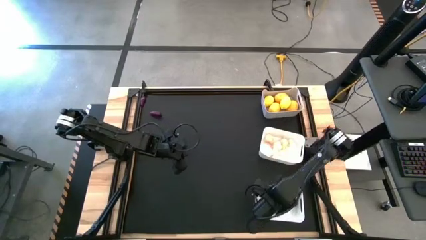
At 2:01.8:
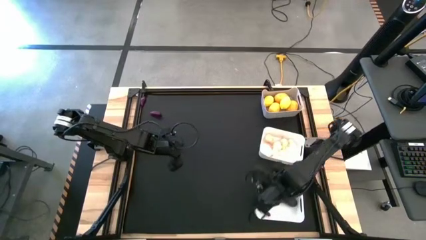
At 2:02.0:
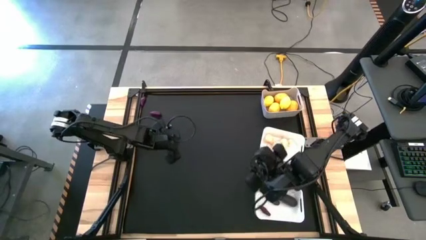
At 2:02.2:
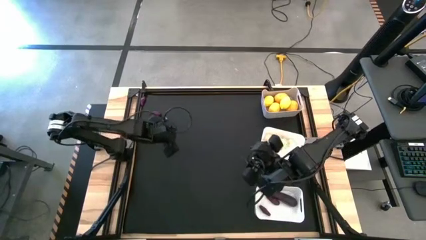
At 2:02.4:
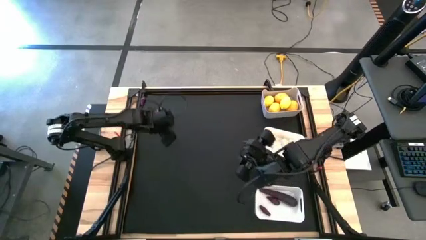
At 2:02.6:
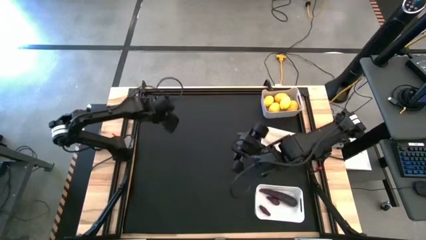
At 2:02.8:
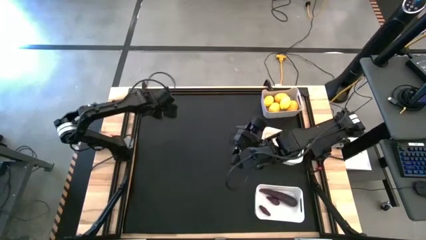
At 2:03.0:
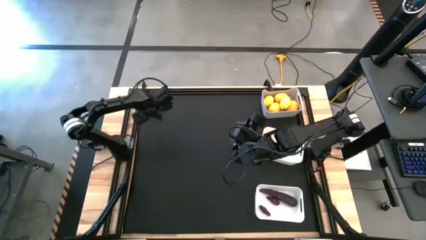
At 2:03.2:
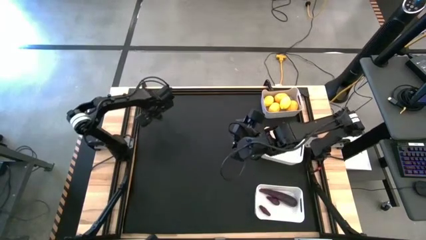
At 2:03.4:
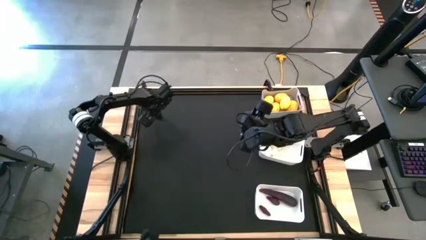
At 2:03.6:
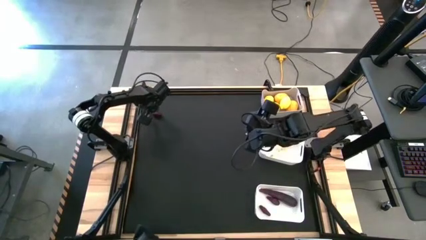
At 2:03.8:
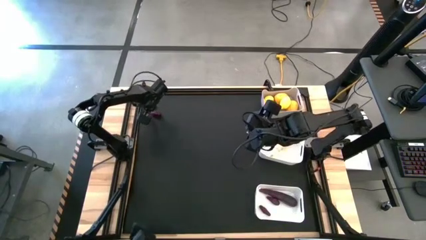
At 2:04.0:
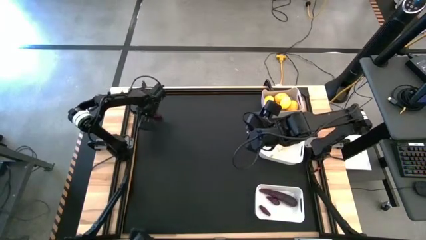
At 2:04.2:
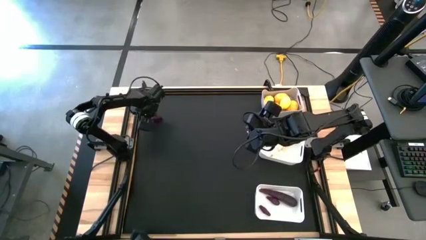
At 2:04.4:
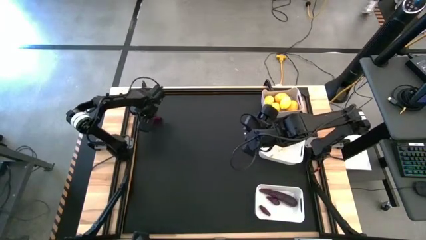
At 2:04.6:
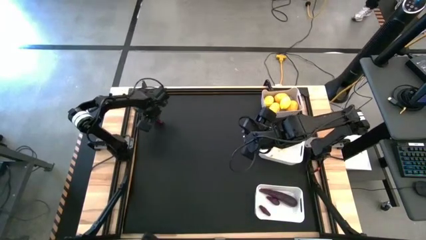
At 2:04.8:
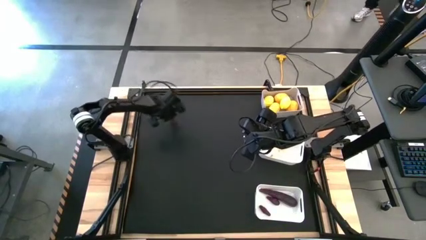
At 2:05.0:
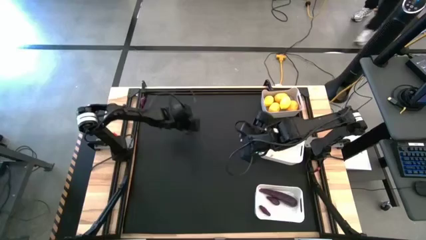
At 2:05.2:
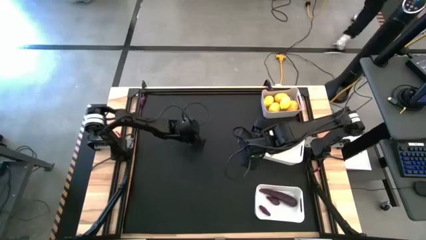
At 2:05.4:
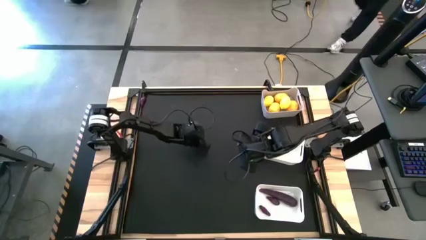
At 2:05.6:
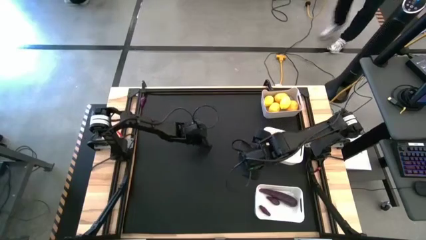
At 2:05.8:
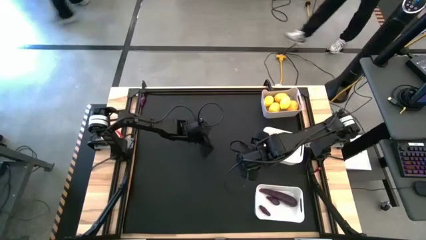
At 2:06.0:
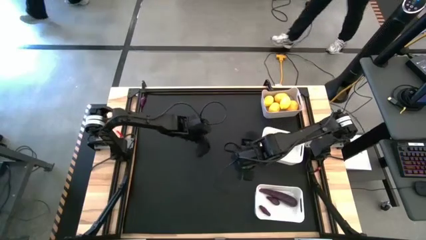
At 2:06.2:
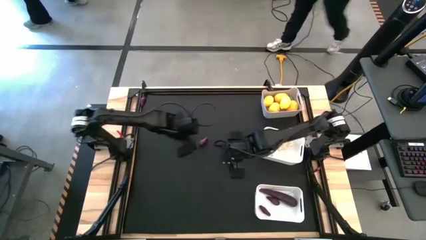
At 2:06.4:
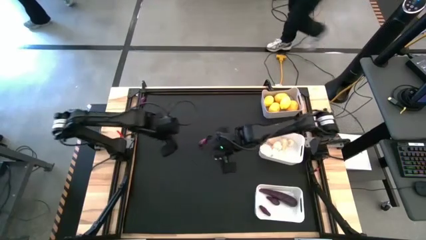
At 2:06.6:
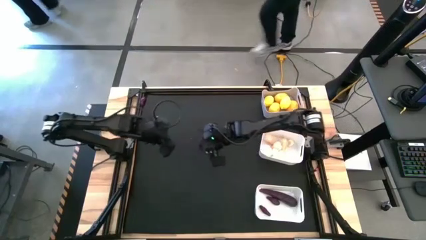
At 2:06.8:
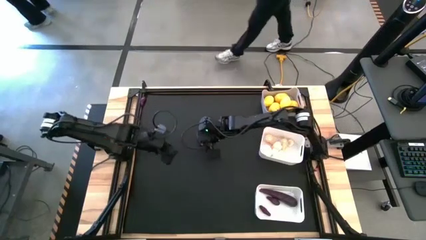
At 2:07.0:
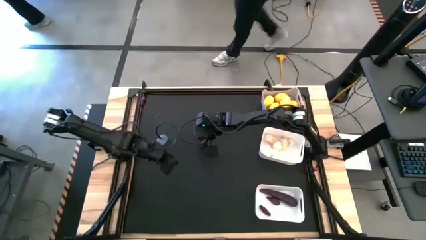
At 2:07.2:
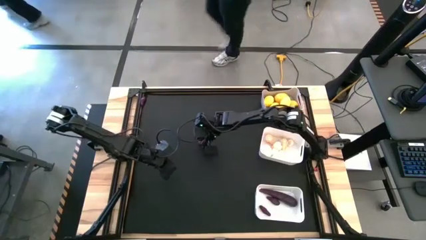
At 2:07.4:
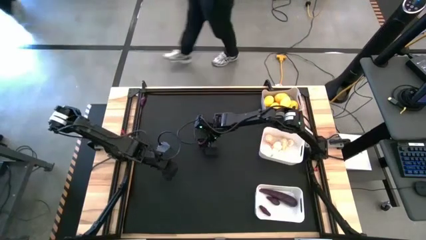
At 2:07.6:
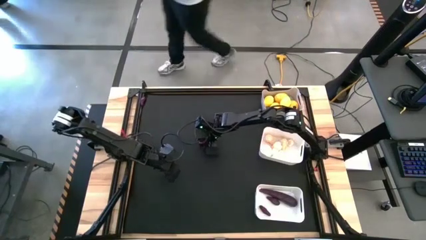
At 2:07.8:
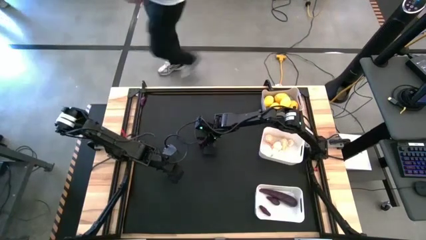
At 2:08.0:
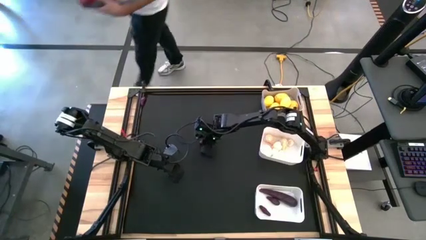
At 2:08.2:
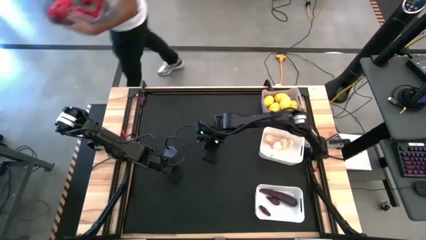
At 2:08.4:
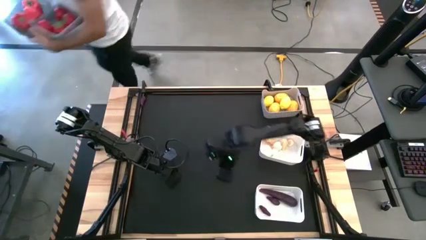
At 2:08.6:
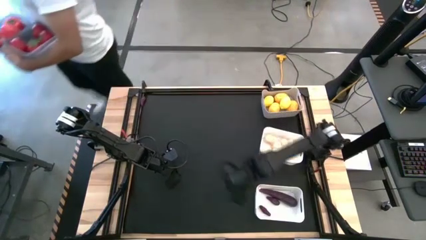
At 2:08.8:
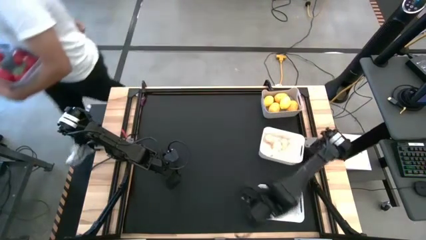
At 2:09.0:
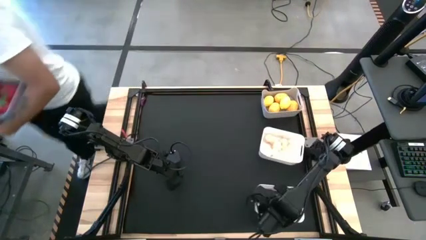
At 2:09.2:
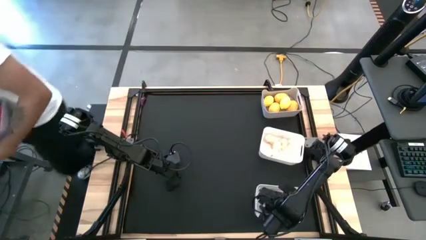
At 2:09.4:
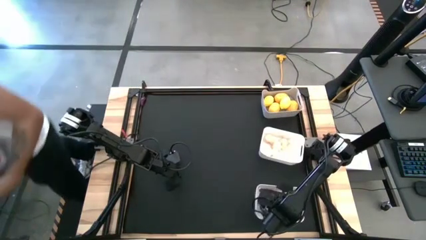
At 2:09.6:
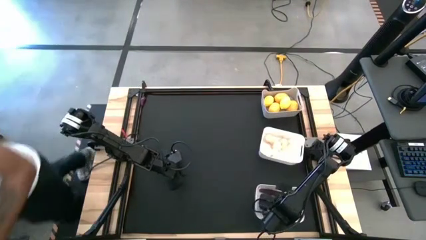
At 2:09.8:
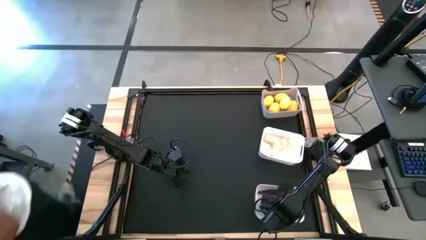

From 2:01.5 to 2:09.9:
Task: Sort produce into baskets
Put the eggplant into the bottom white bin

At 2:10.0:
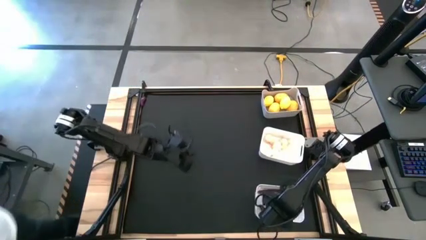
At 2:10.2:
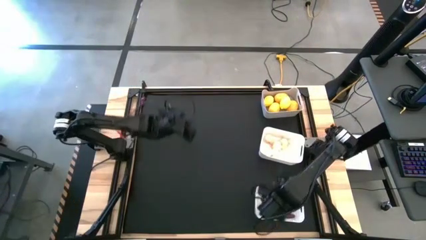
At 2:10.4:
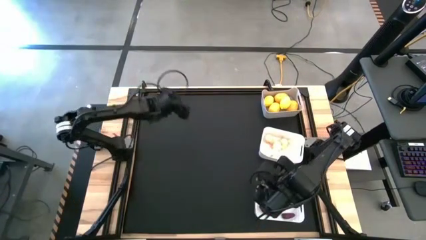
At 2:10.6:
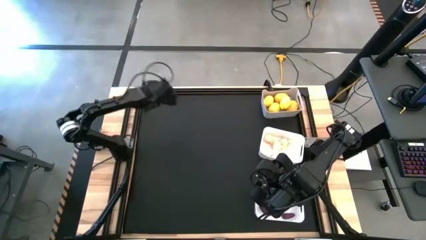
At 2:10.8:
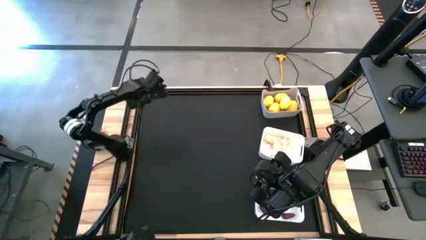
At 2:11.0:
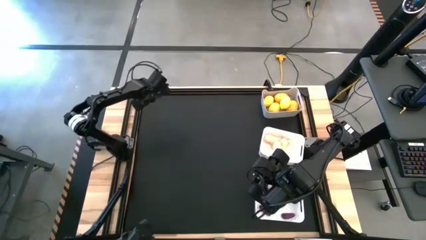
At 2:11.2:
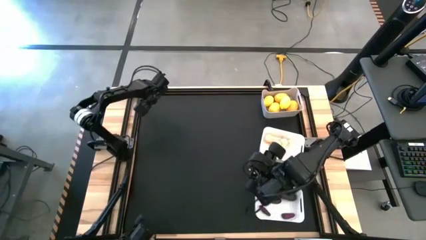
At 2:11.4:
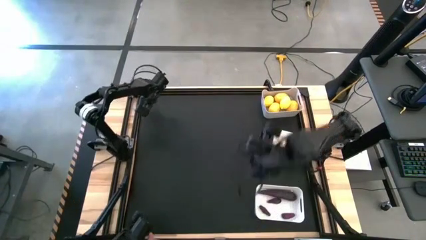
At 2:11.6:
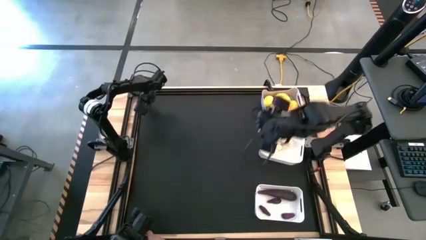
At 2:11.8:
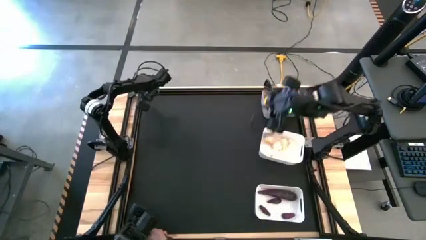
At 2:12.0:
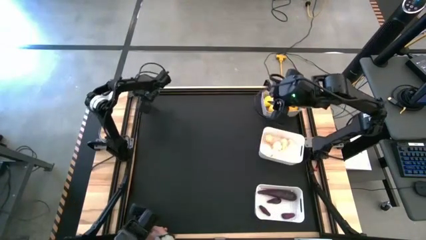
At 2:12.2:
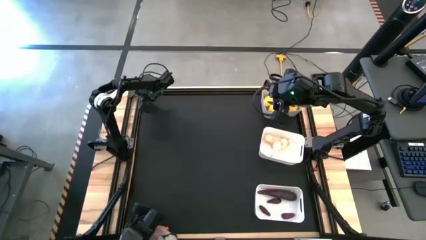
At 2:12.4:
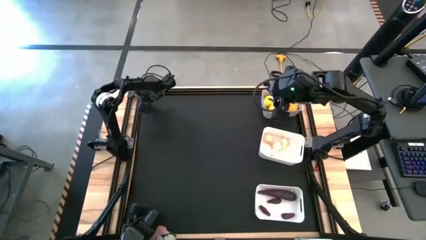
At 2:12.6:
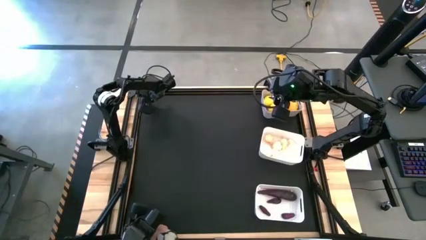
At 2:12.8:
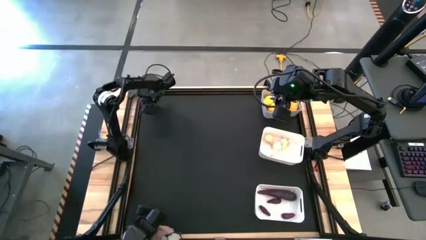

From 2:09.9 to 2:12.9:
Put the eggplant into the bottom white bin

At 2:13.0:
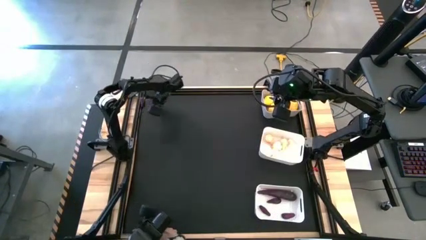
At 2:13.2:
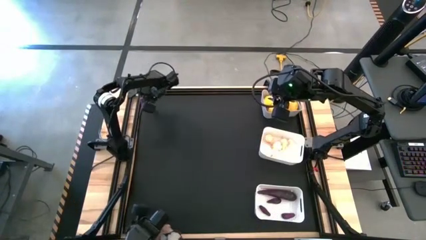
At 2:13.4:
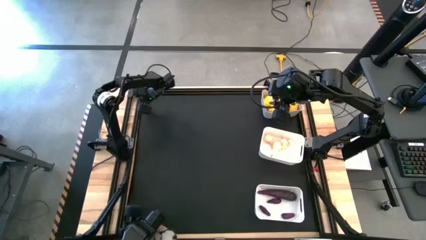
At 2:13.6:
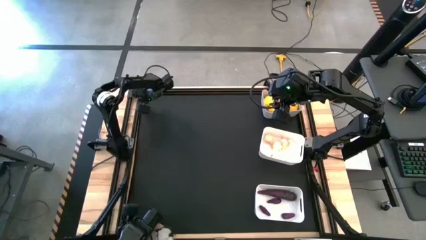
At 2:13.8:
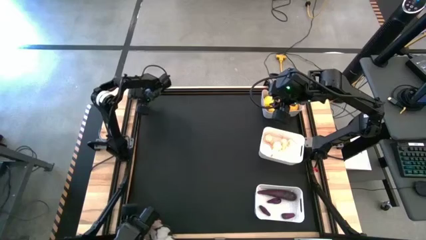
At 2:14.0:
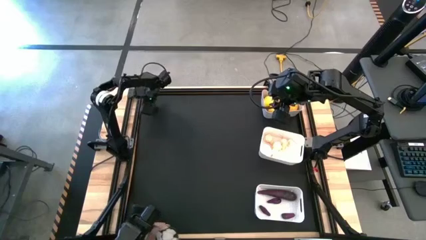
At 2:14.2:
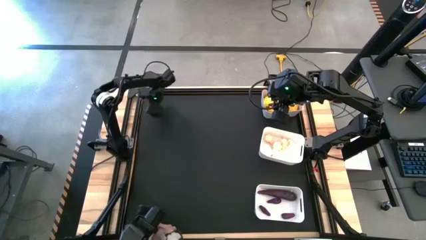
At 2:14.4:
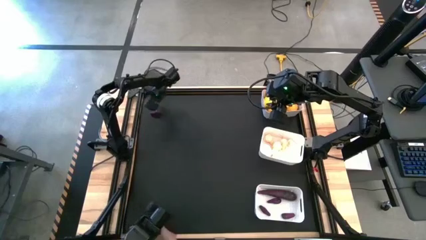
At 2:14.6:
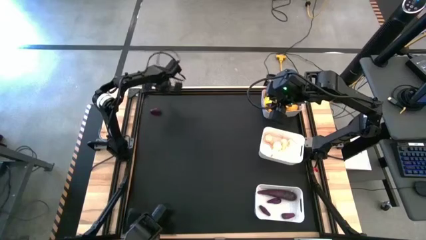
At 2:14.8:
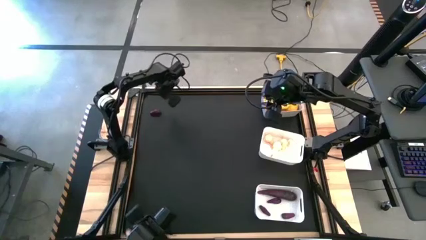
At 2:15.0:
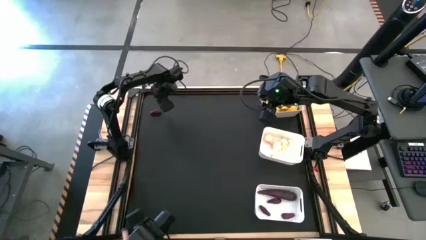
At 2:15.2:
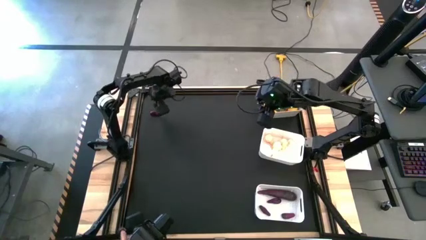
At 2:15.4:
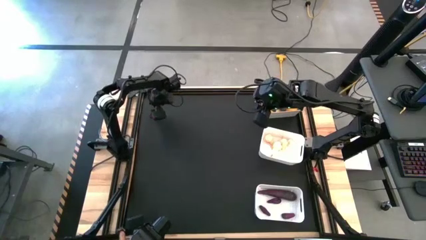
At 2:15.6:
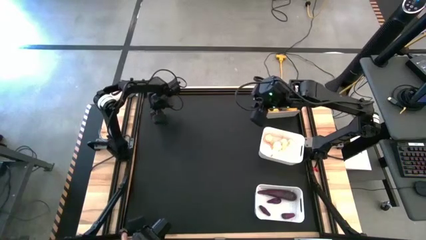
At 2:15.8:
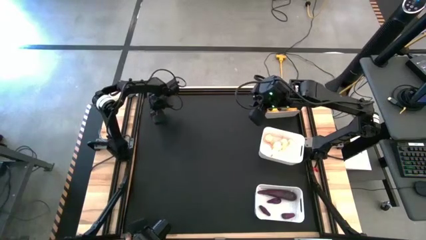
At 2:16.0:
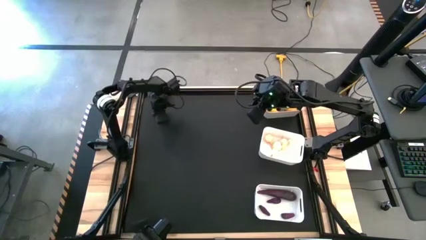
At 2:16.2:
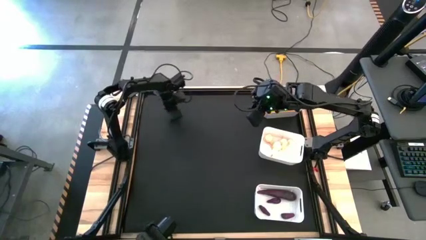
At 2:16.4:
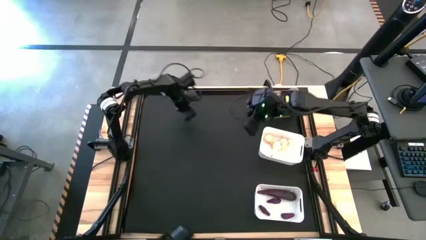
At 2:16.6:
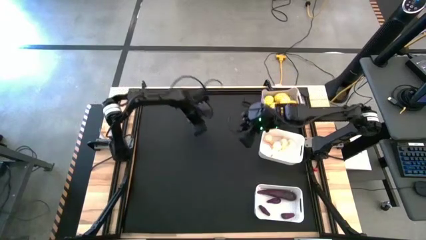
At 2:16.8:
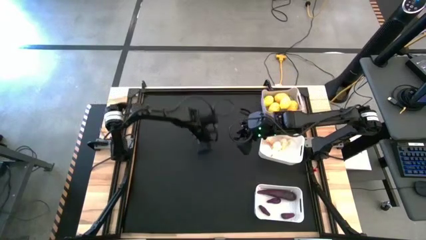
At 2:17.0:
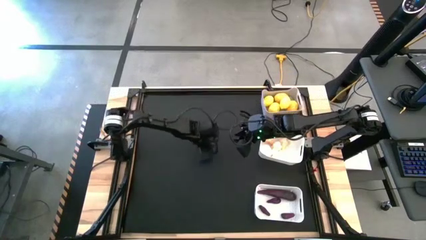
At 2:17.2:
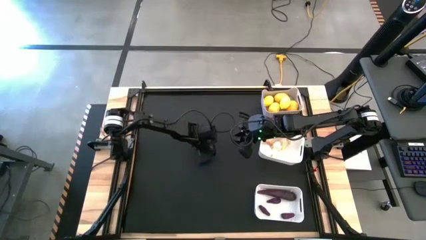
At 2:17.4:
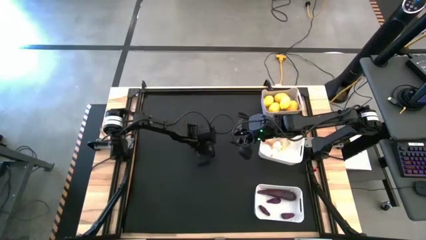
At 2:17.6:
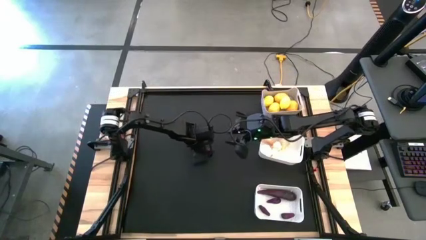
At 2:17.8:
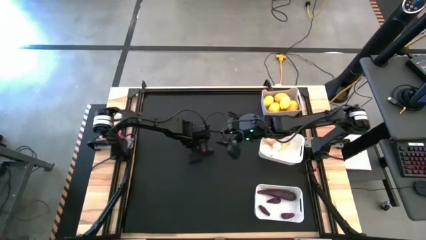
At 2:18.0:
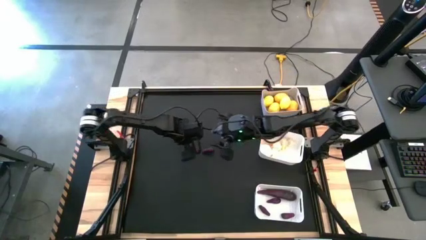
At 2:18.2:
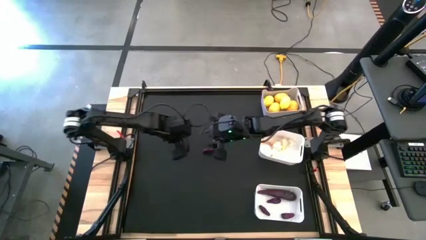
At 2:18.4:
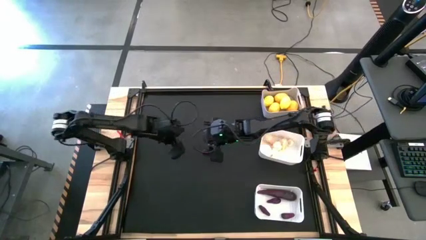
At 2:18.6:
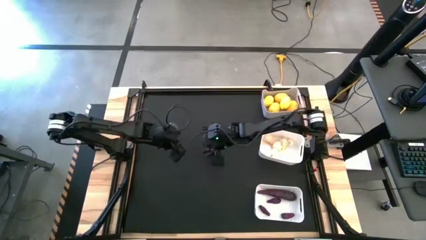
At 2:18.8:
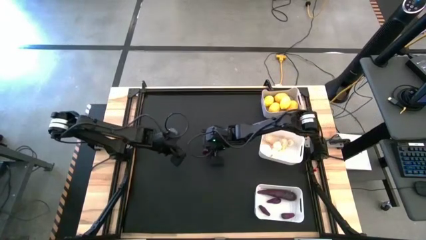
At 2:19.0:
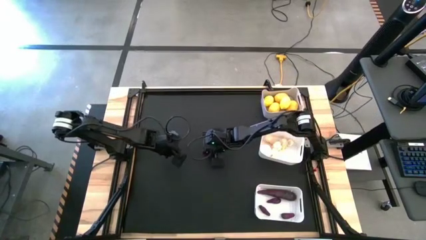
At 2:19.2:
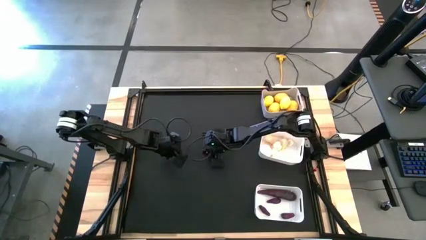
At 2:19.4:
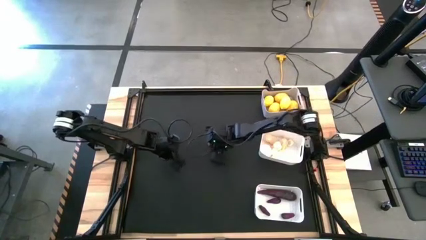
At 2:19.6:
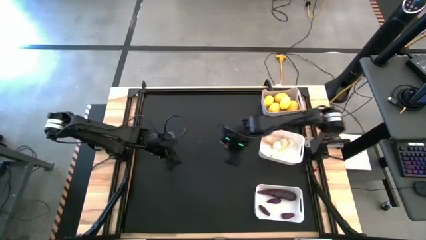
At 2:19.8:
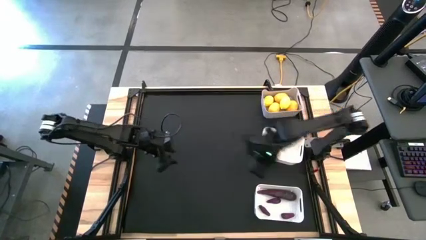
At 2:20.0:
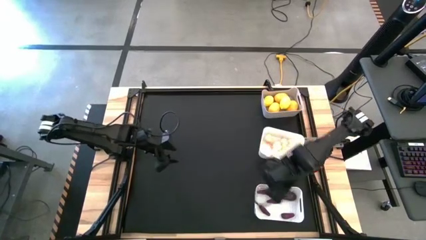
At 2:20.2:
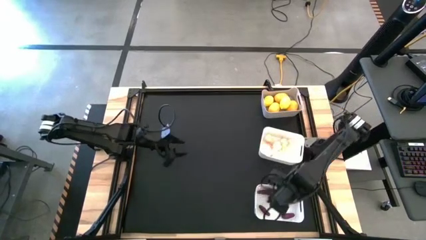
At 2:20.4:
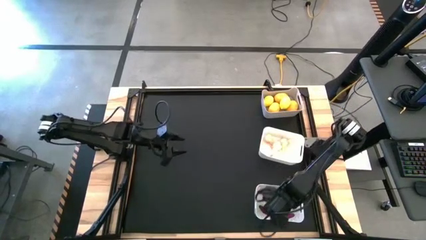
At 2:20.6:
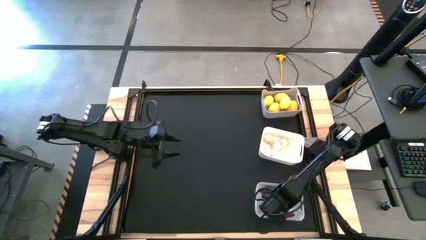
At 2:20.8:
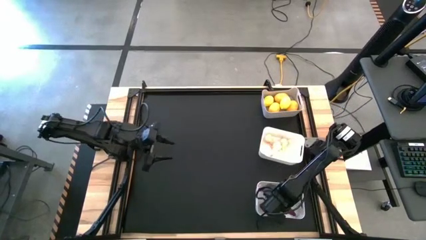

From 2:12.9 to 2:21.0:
Put the eggplant into the bottom white bin
